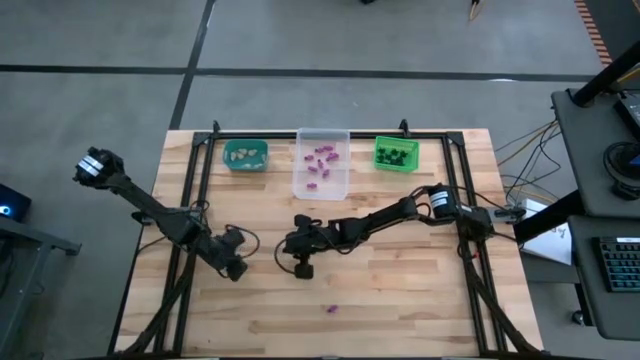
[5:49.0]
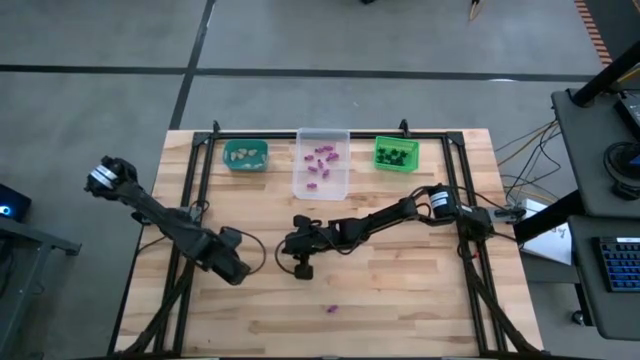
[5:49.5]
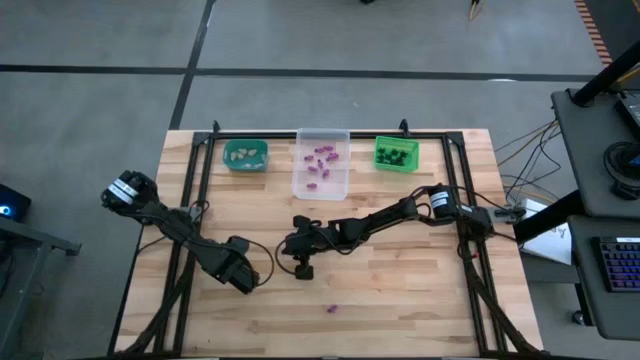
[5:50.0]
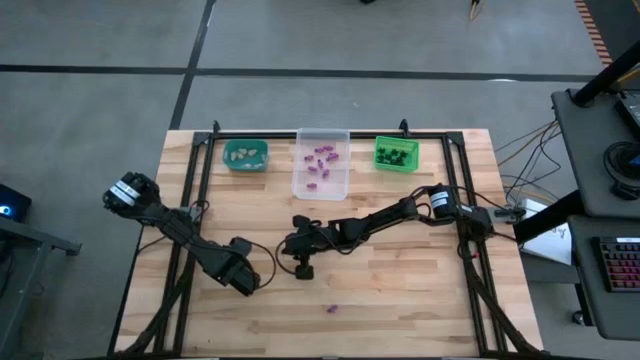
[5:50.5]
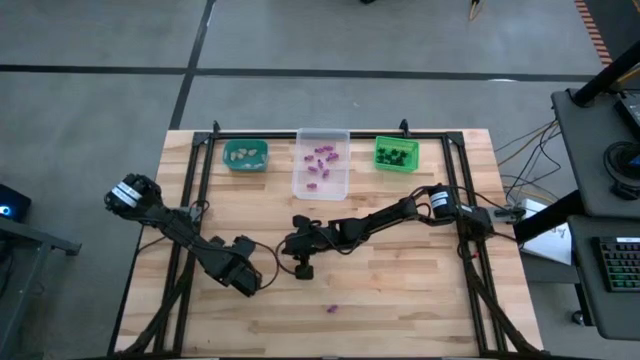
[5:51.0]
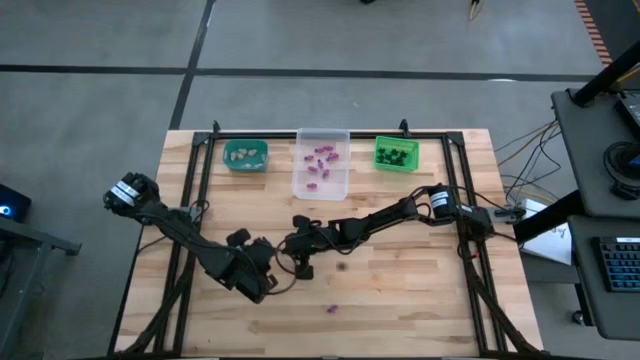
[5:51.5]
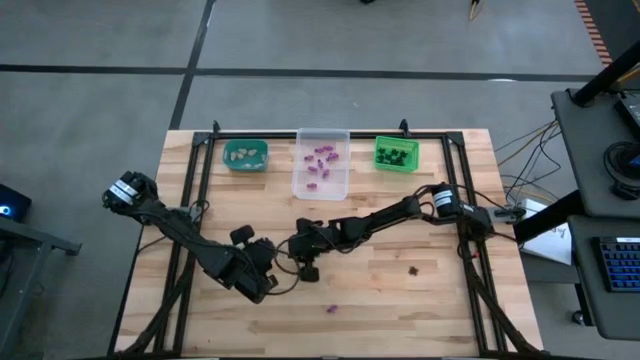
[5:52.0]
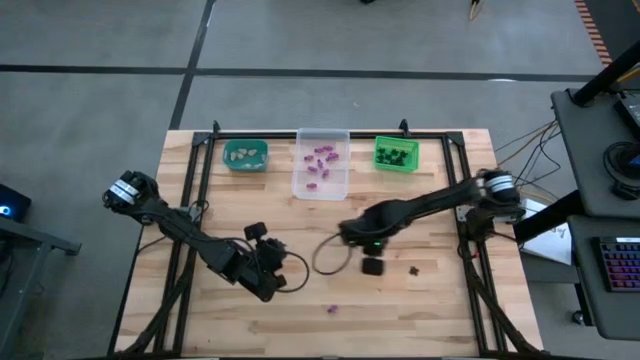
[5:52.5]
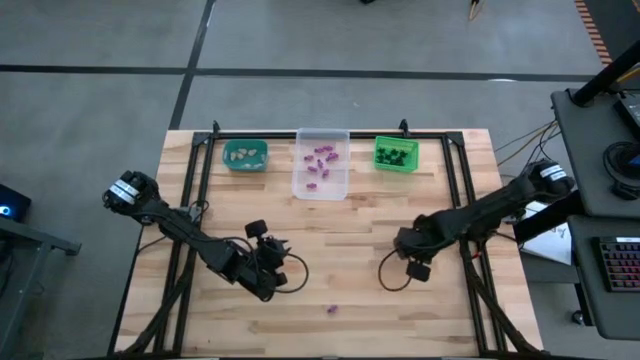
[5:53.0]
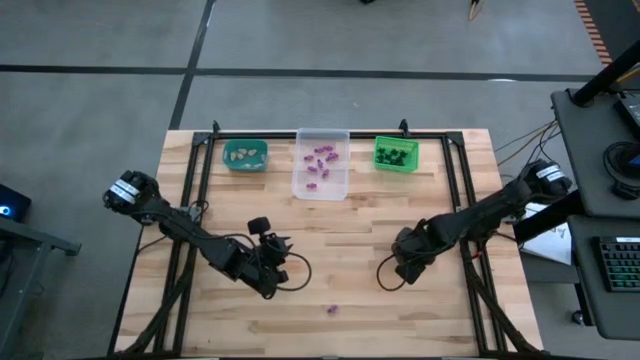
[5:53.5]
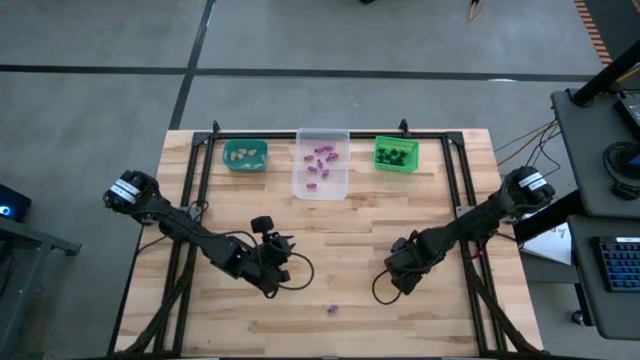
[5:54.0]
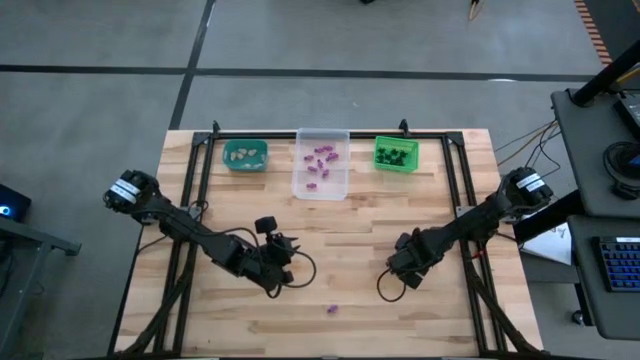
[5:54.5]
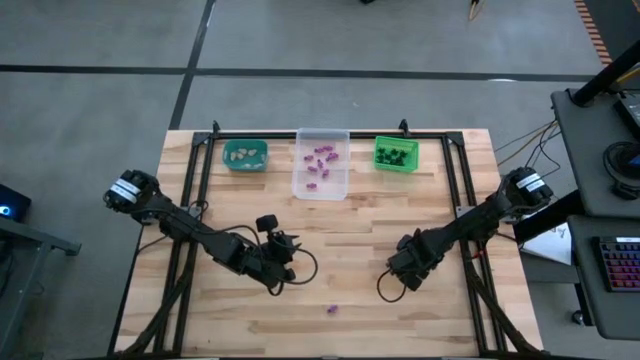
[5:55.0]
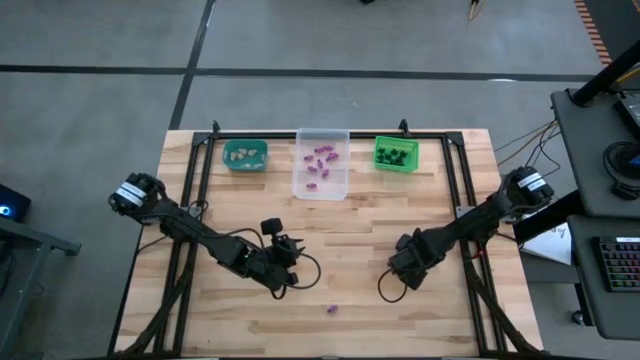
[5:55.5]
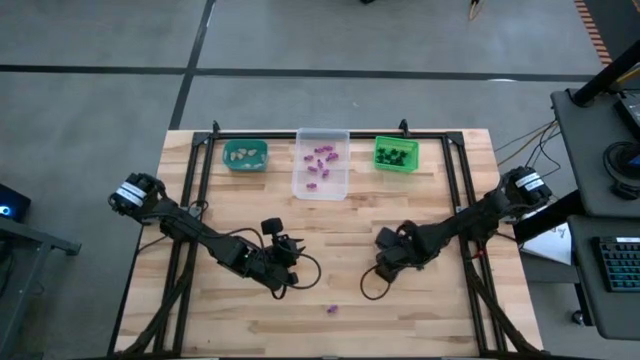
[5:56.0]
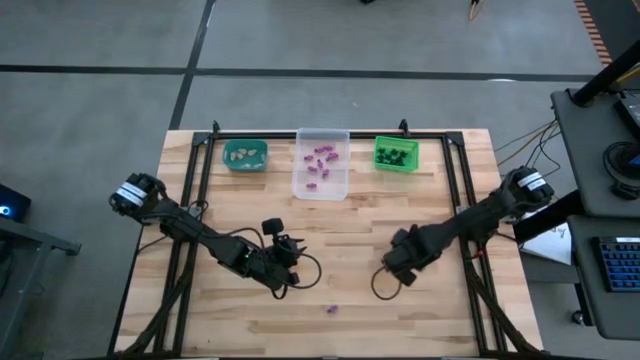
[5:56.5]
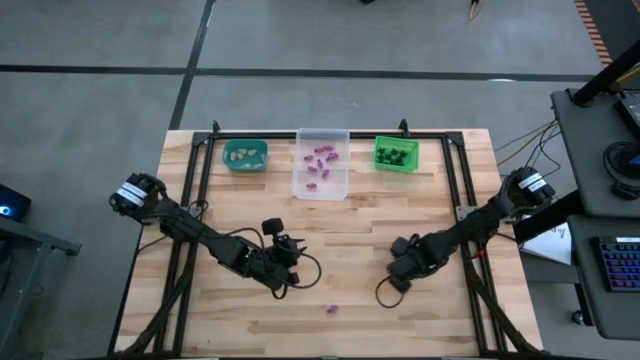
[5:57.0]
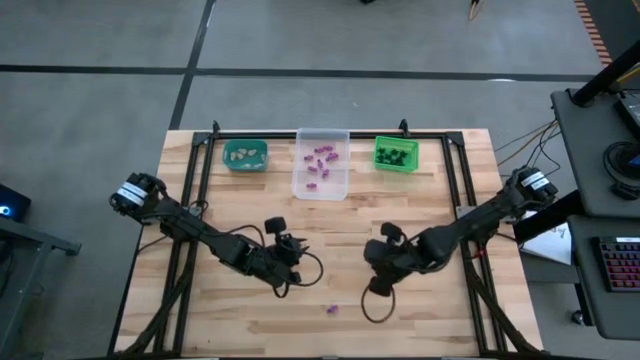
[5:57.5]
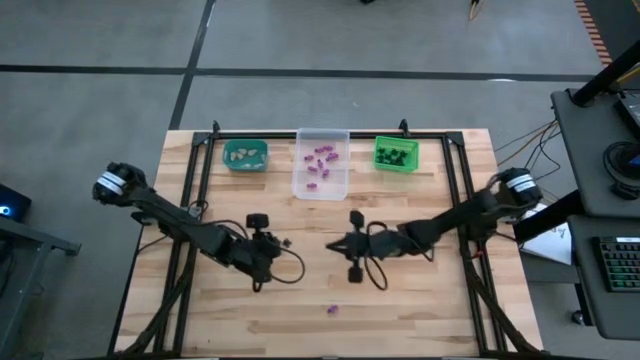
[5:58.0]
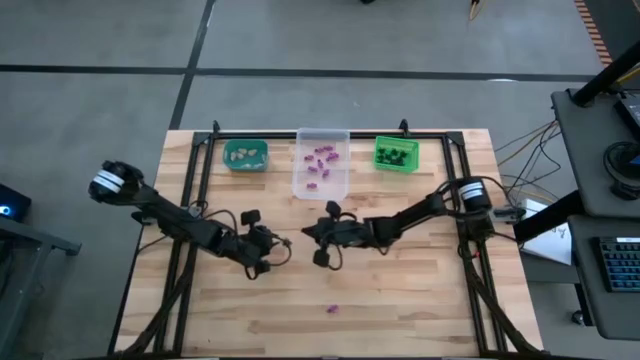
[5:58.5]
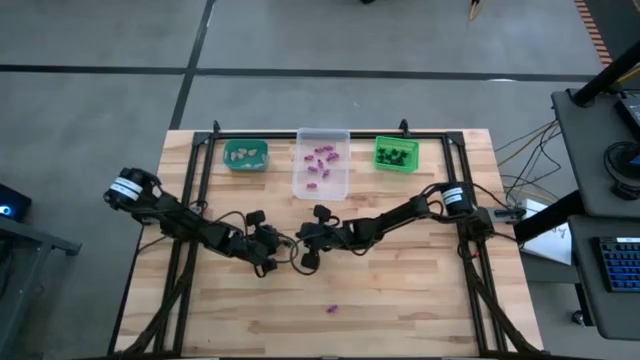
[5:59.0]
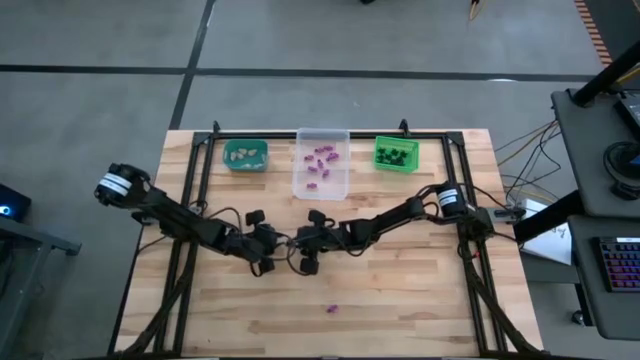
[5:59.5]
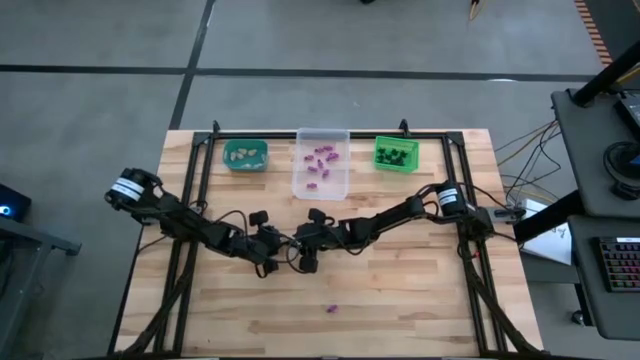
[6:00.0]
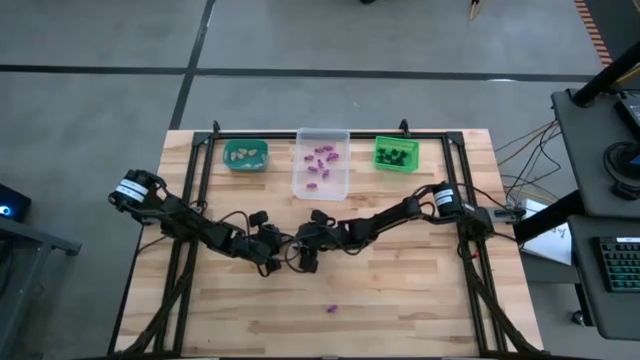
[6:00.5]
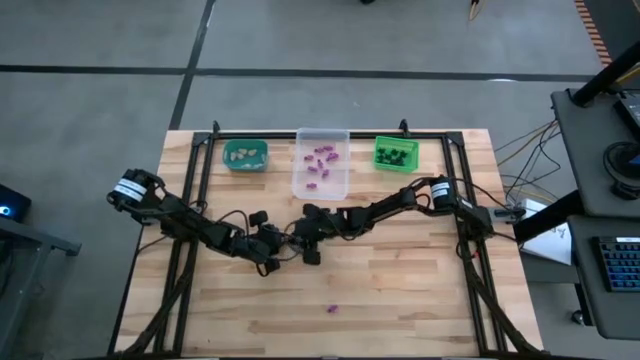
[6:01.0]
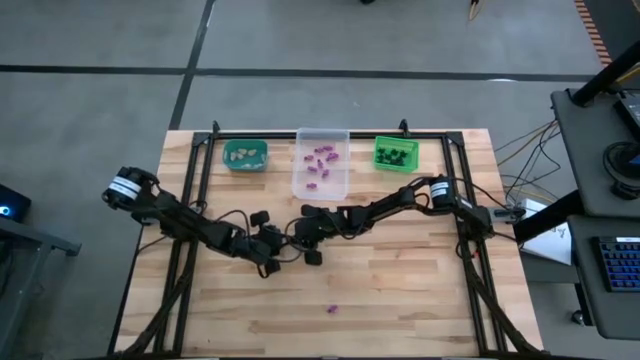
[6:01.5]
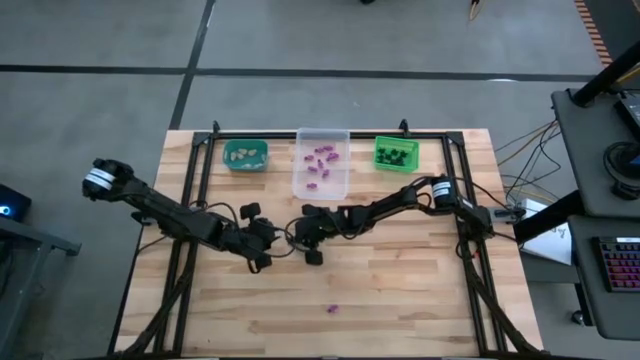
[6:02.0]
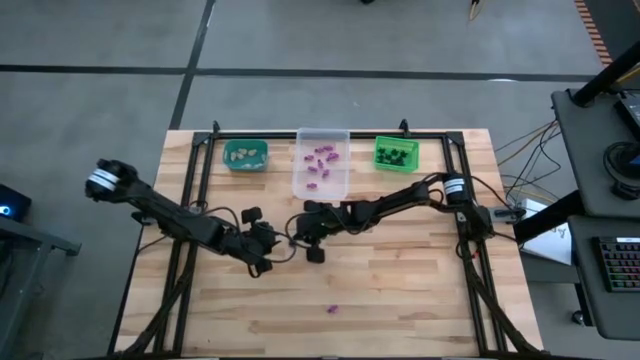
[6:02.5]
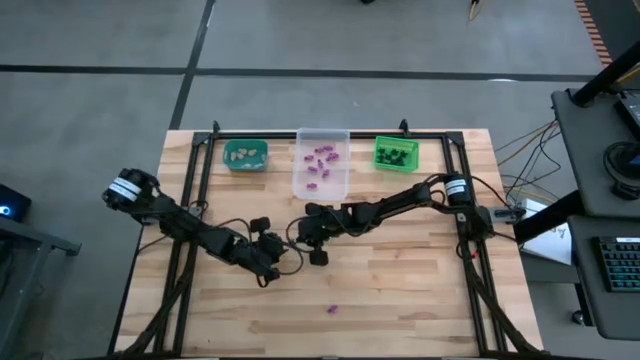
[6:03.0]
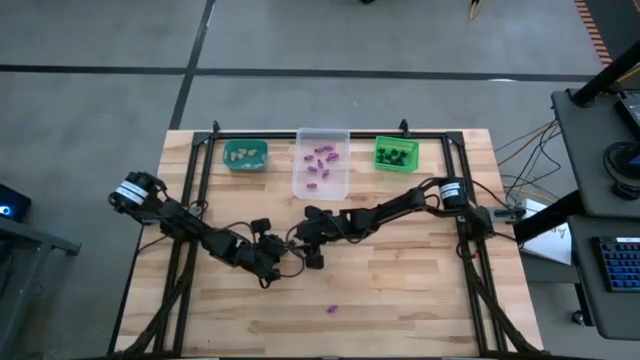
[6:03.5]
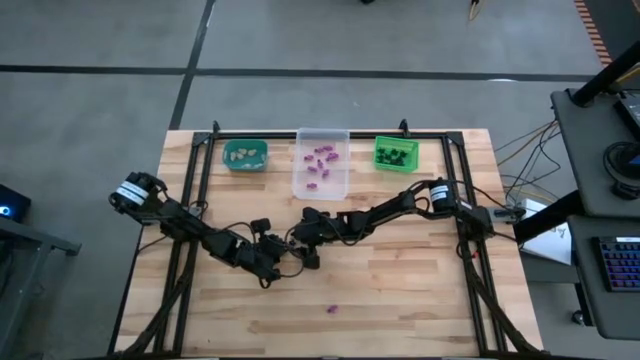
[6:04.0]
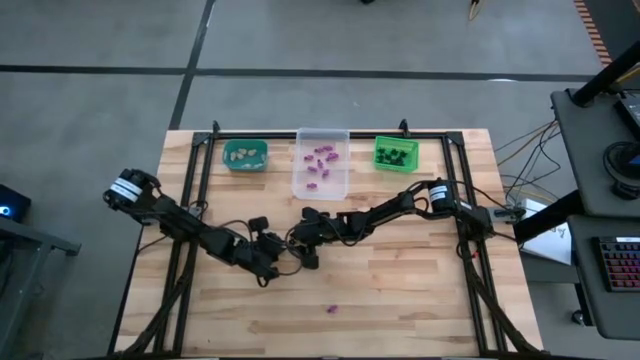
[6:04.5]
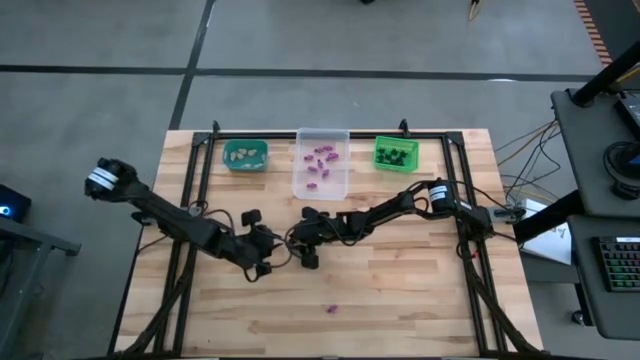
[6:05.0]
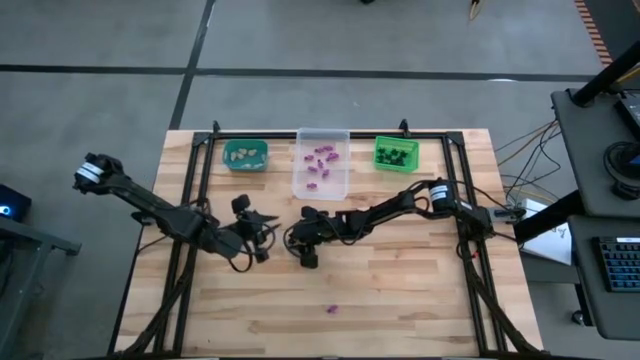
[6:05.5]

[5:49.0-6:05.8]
Task: Sort Halloween decoration
Put the black spider toy into the green bin

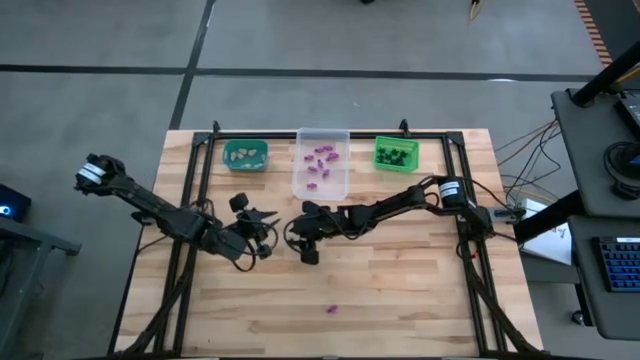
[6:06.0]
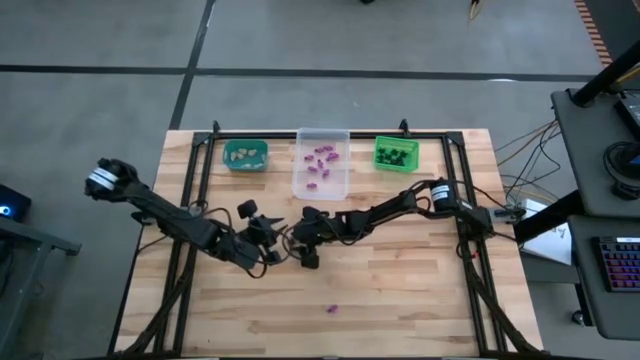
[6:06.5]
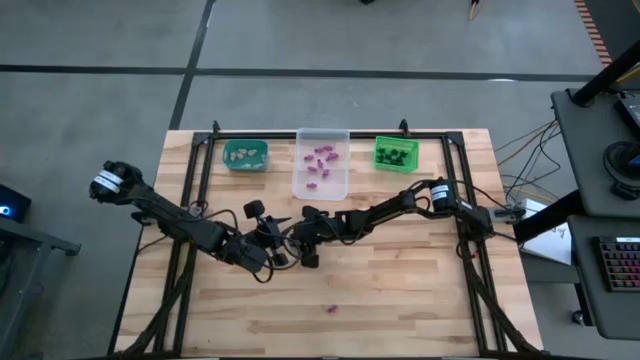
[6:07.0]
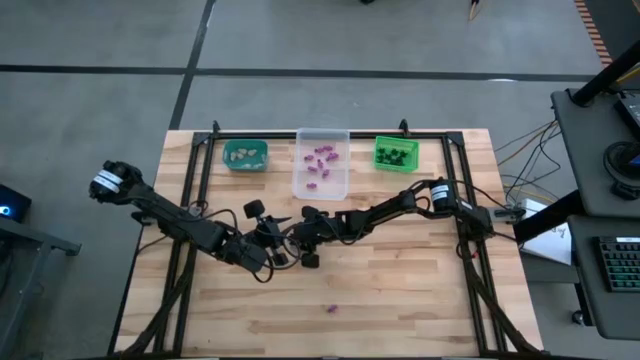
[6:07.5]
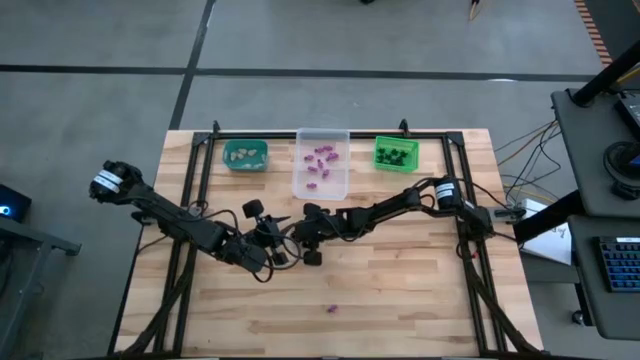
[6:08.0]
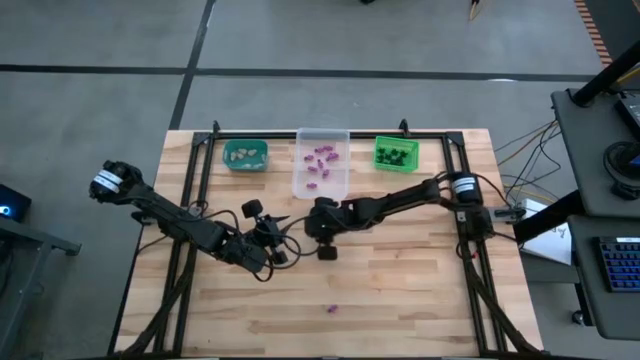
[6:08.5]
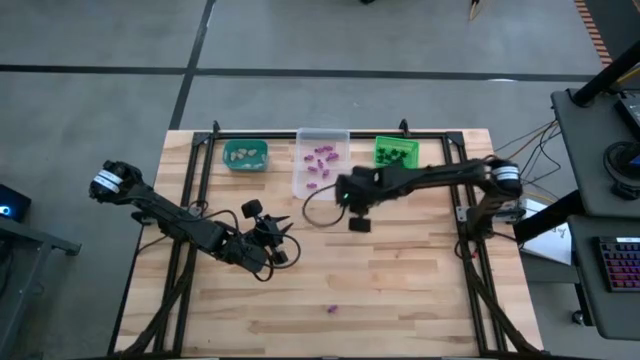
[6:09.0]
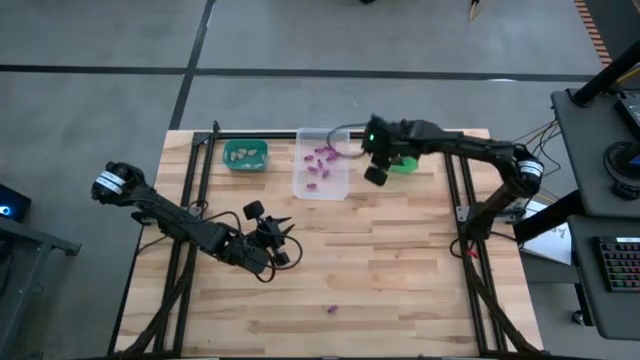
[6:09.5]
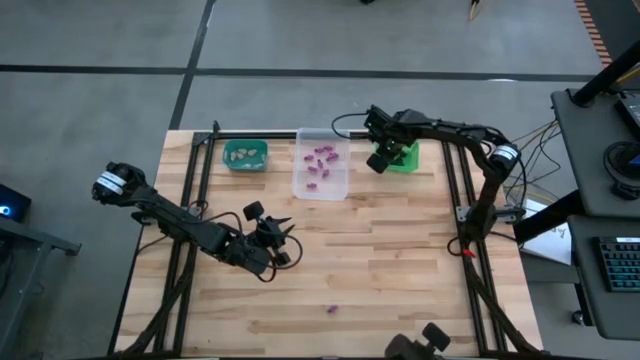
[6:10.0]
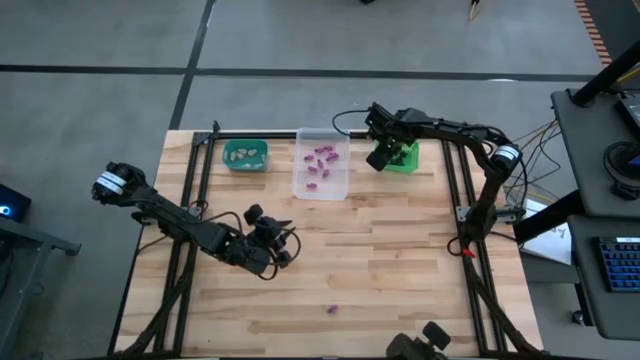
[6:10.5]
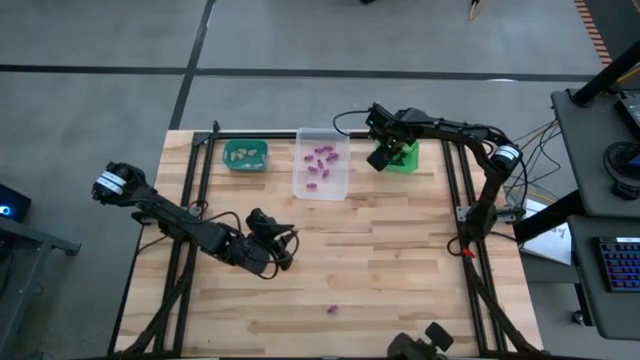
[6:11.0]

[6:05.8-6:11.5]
Put the black spider toy into the green bin
